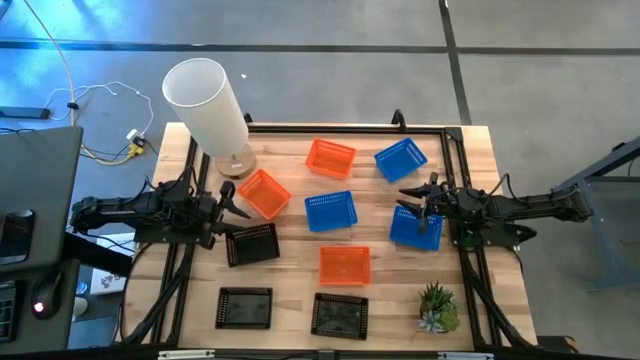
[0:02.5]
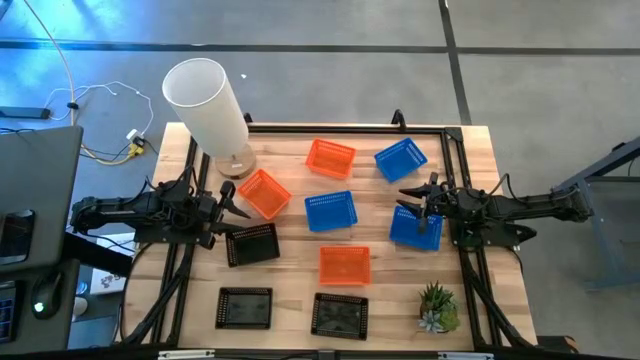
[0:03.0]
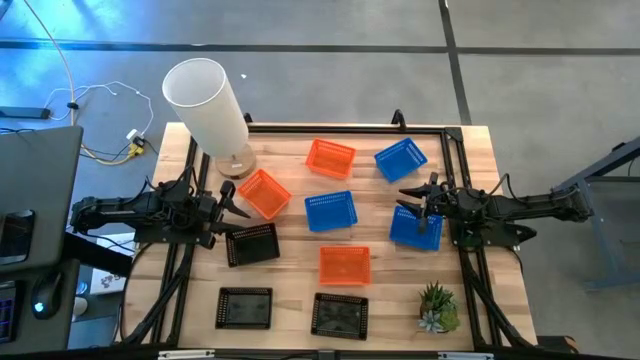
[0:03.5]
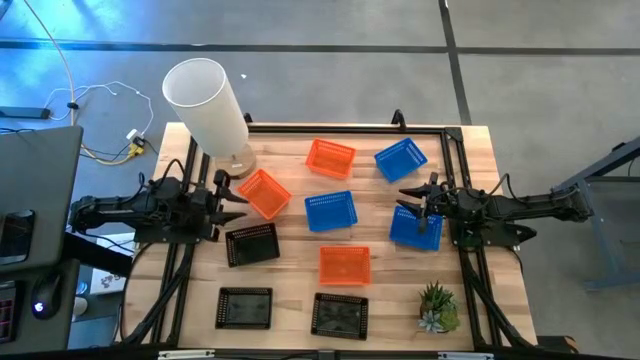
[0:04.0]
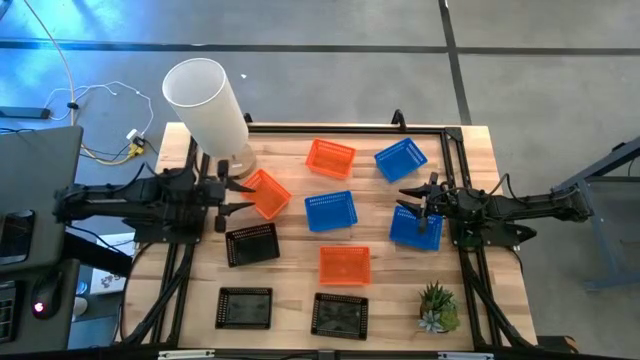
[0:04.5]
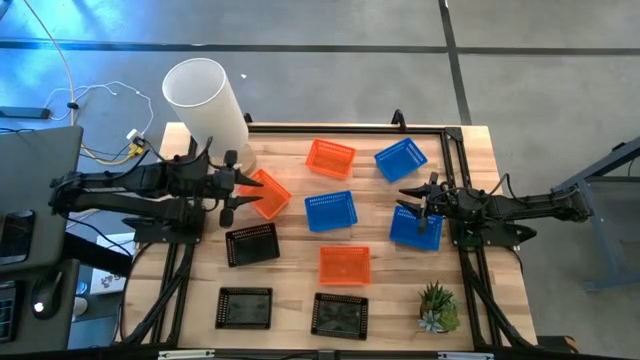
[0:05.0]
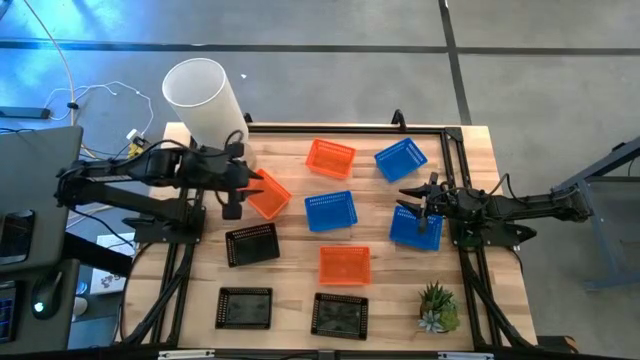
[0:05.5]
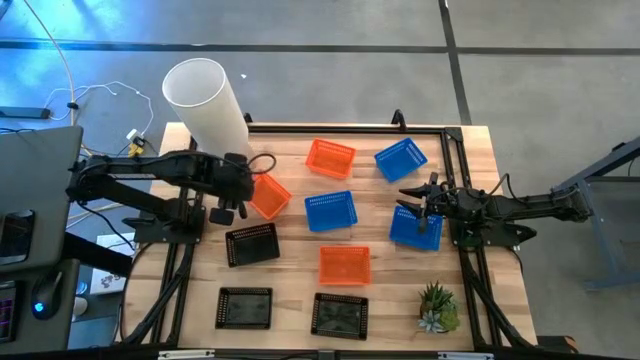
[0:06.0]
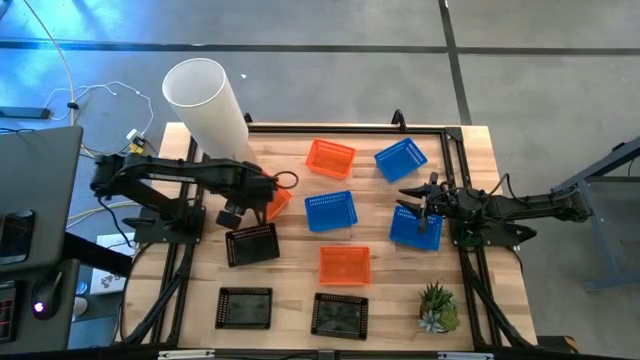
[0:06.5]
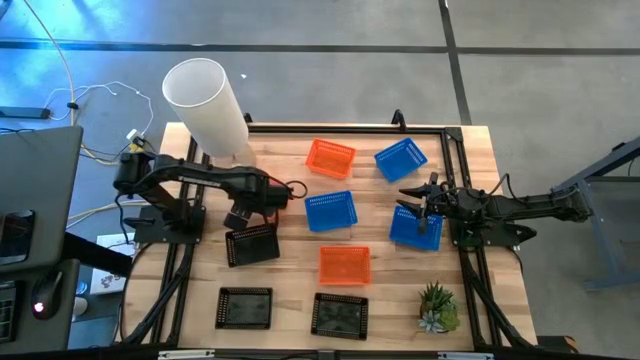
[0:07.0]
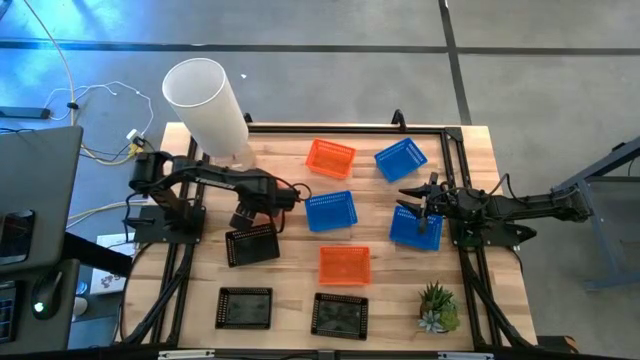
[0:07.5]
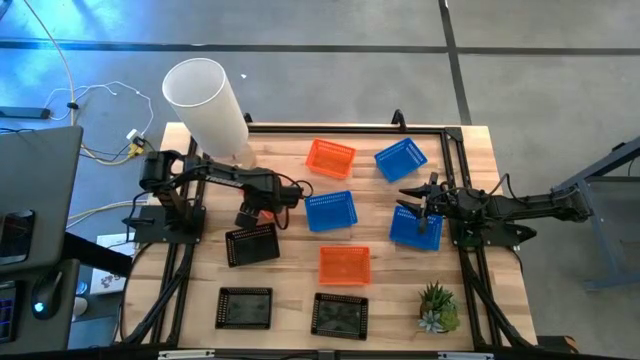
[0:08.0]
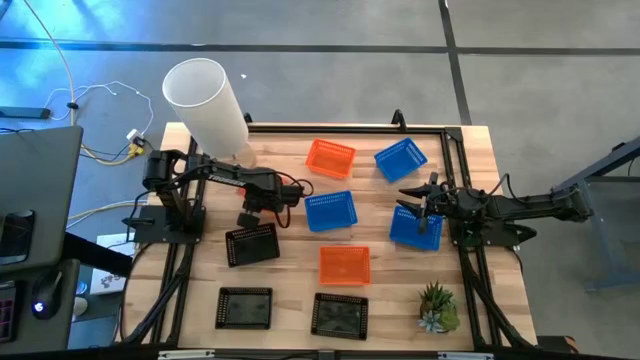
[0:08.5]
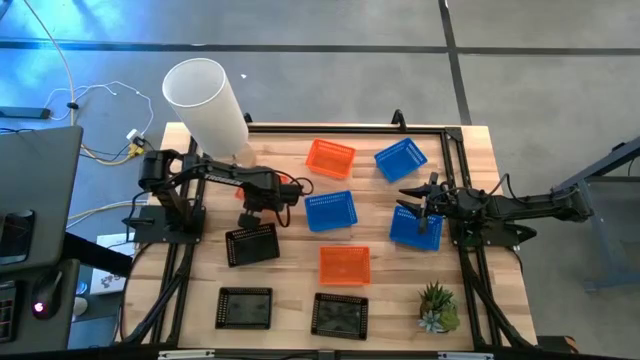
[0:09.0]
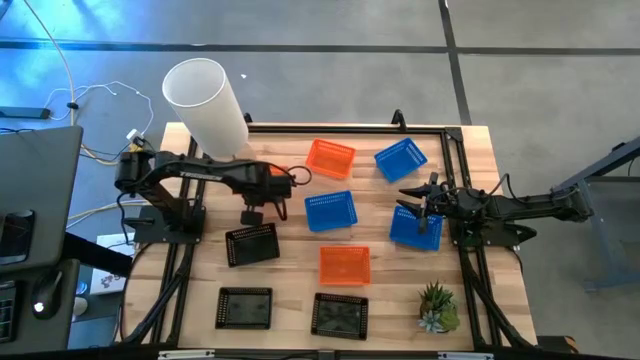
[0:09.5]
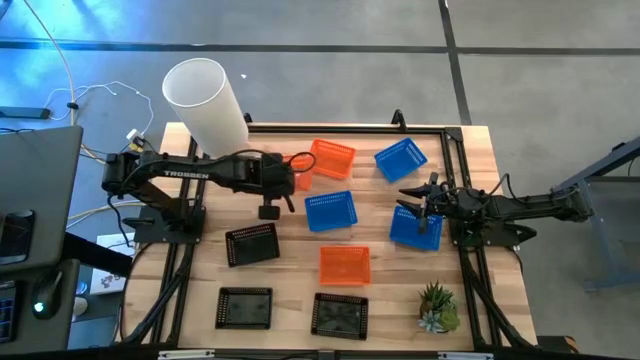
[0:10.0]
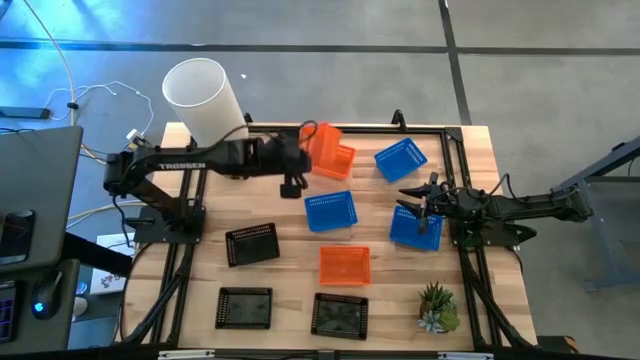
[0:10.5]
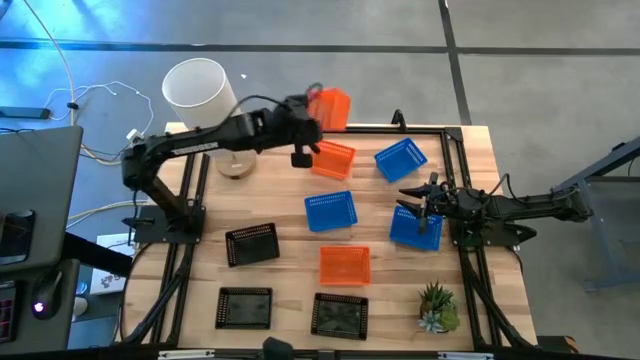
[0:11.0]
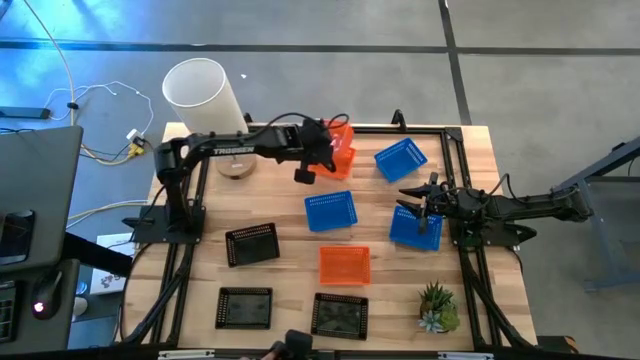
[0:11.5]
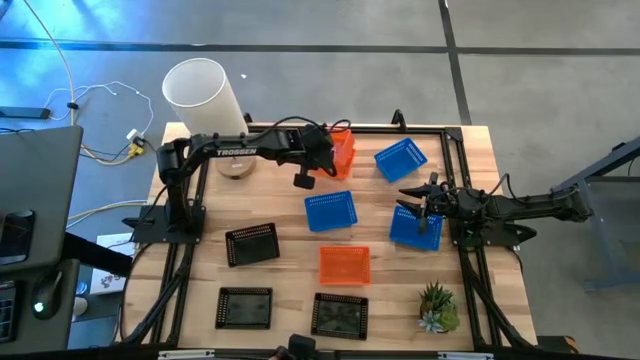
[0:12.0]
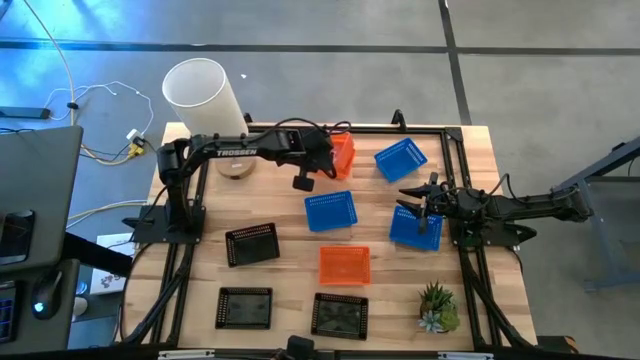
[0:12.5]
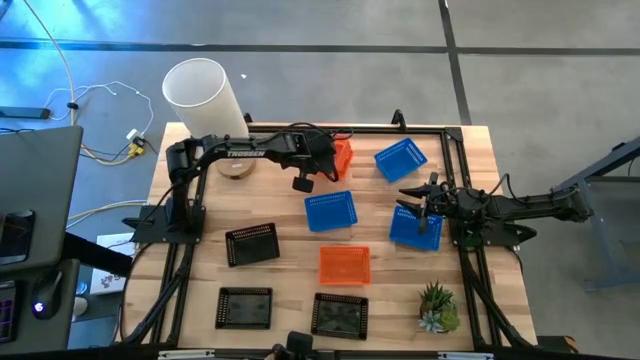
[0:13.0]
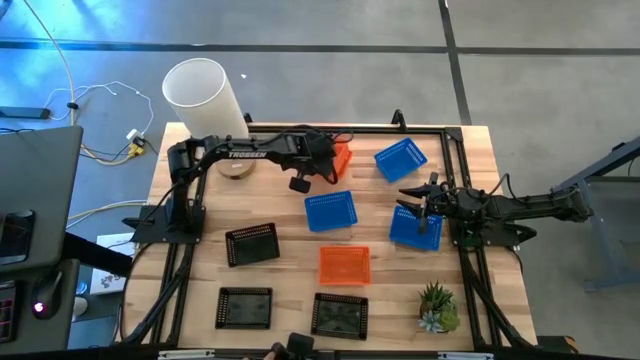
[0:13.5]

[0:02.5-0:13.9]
Stack the middle orange bin on top of the top orange bin
